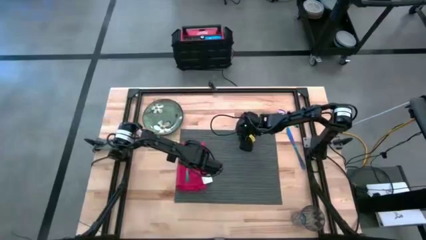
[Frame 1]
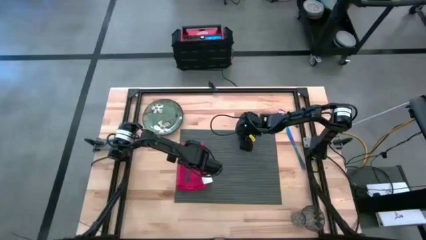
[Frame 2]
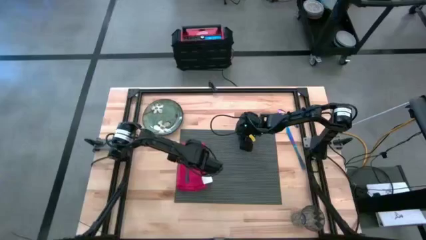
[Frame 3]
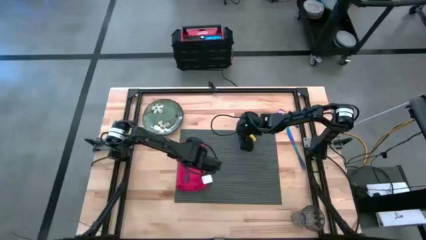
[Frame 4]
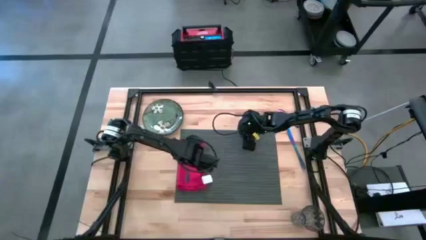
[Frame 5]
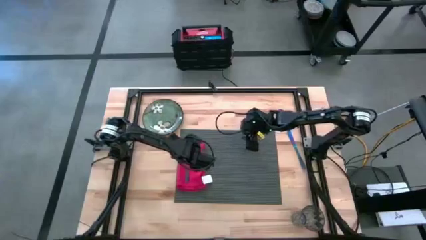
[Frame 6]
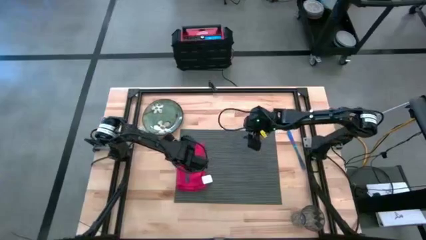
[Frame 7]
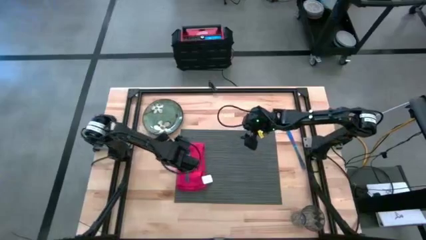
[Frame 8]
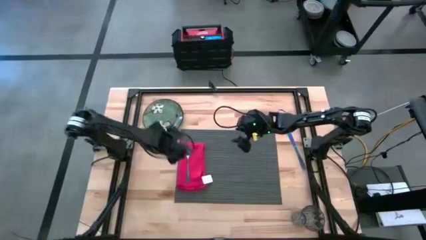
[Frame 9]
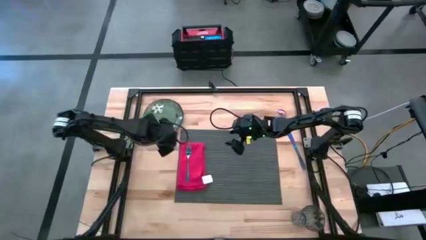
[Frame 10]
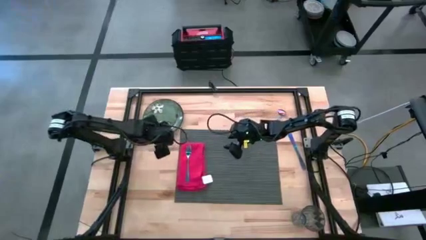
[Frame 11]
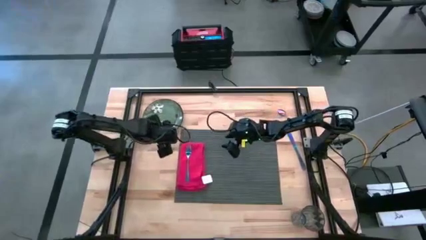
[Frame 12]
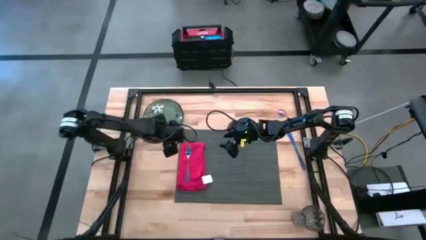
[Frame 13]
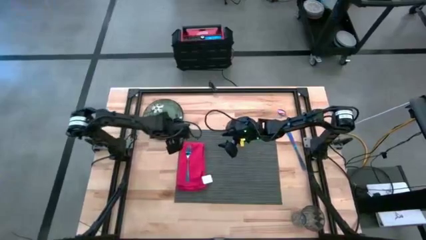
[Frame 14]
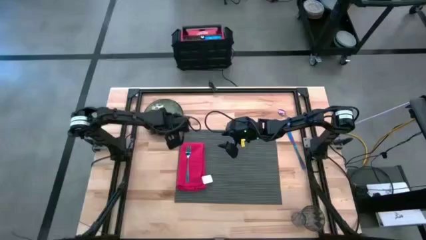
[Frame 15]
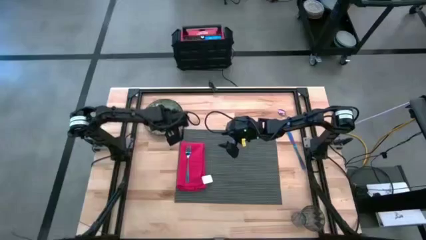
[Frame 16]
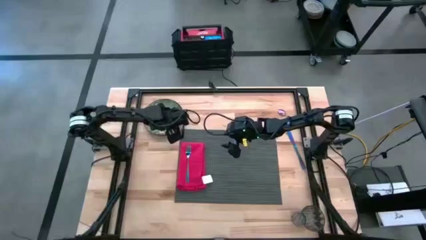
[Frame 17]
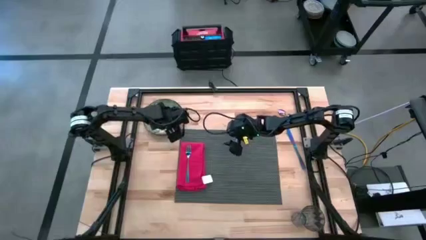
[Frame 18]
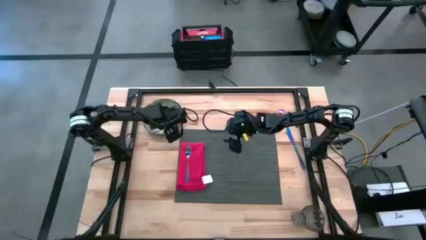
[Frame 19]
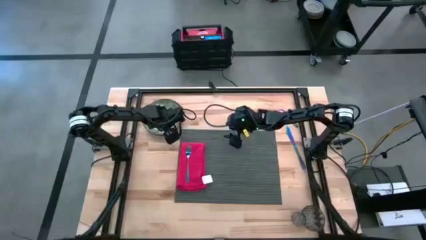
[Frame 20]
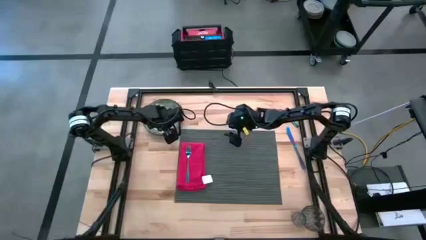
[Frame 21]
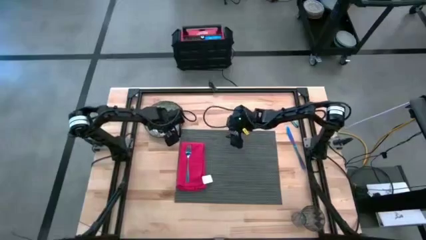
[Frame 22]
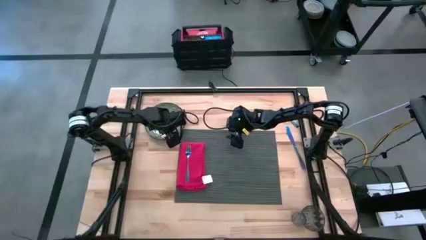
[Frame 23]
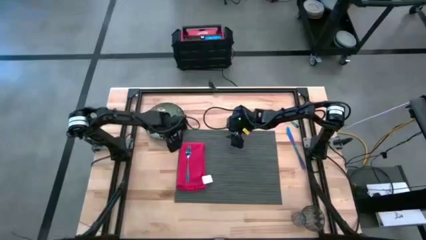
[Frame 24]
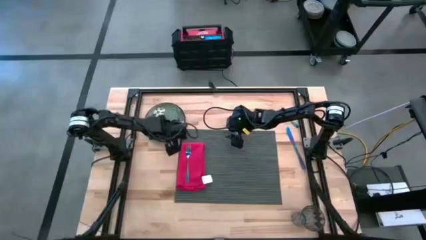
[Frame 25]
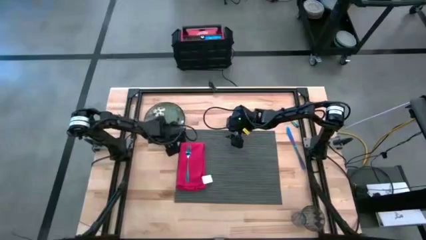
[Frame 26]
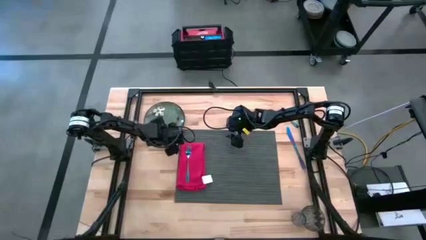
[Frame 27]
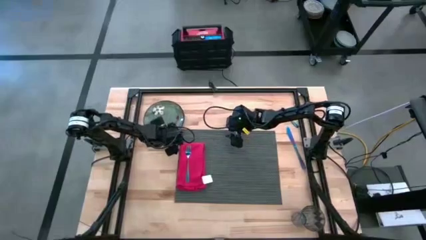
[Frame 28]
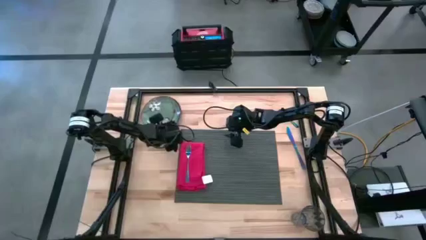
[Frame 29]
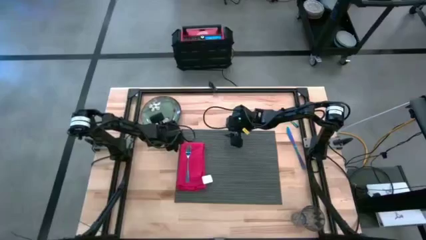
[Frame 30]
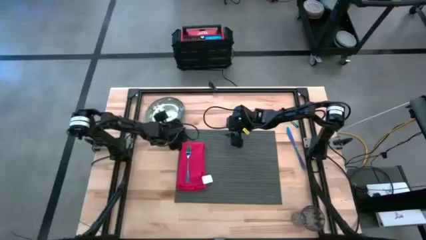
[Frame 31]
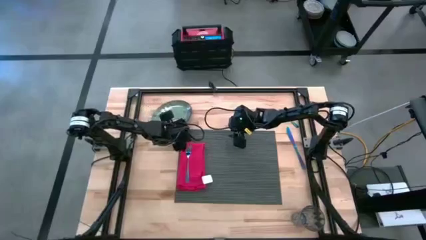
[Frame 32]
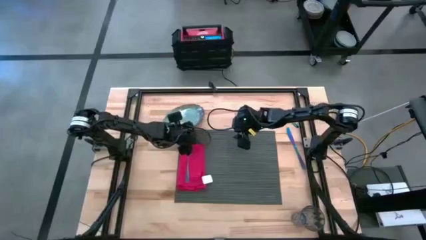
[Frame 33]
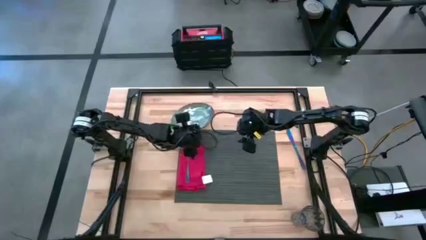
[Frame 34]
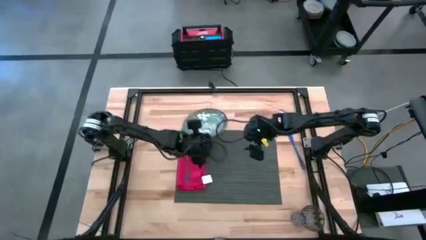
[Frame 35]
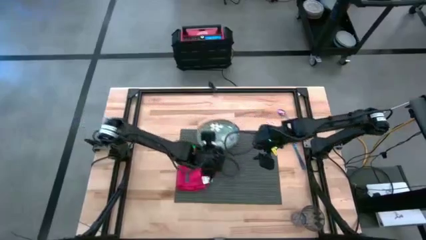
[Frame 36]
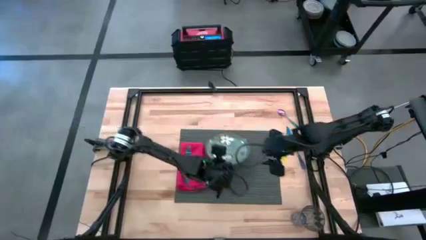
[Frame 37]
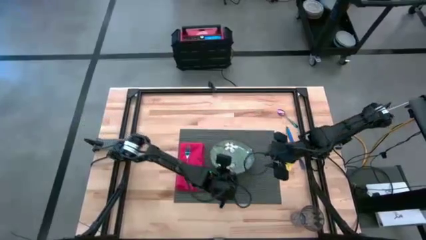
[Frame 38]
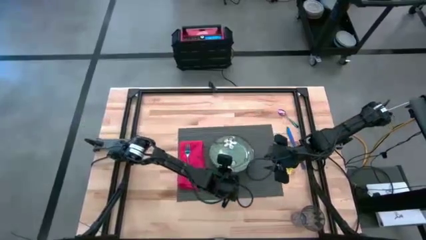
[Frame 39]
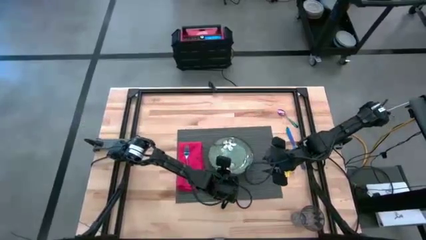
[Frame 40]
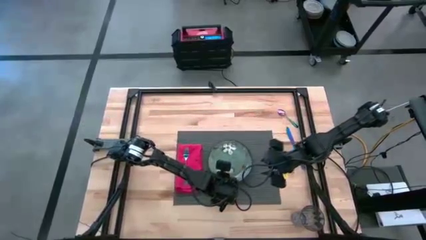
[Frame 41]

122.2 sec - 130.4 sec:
Task: Set table place
Put the green plate in the center of the gray table mat

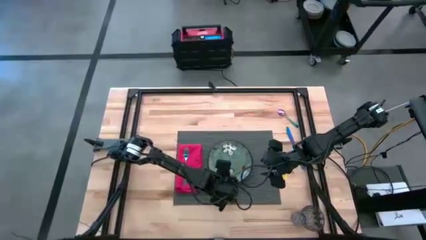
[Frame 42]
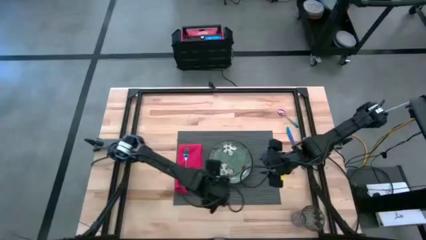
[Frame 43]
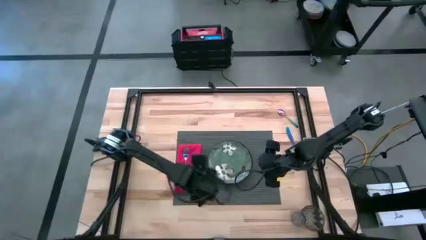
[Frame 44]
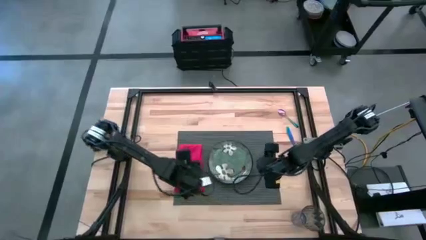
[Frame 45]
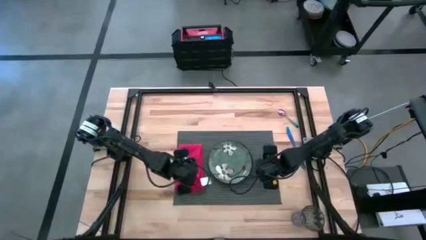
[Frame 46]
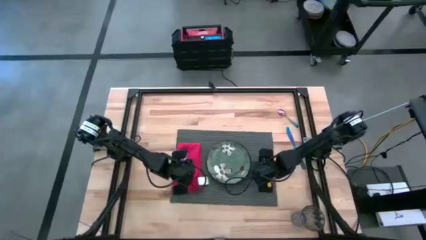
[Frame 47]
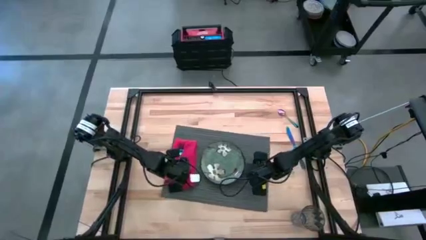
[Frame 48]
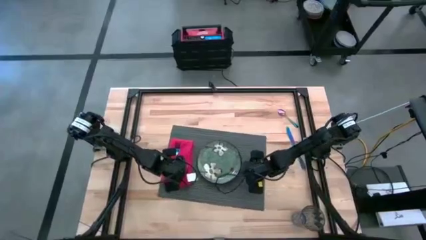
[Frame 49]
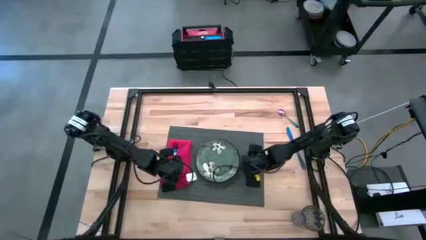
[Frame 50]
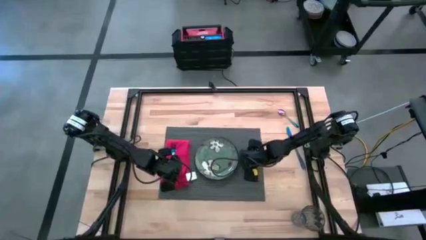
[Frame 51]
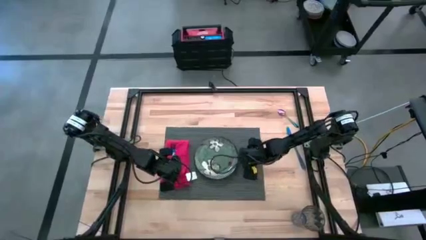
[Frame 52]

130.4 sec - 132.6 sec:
Adjust the gray table mat on the table

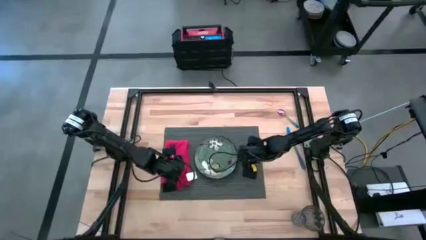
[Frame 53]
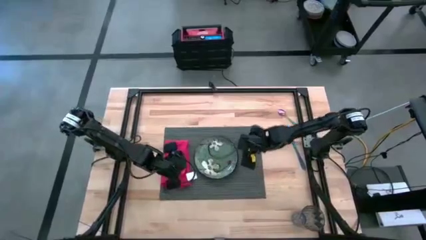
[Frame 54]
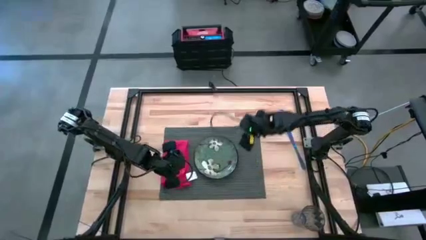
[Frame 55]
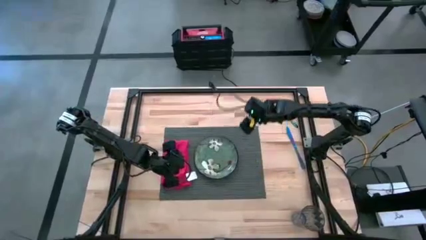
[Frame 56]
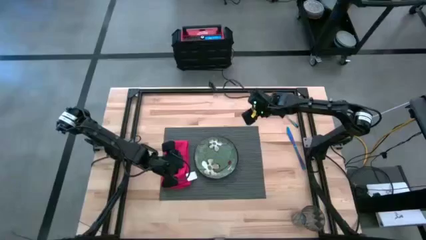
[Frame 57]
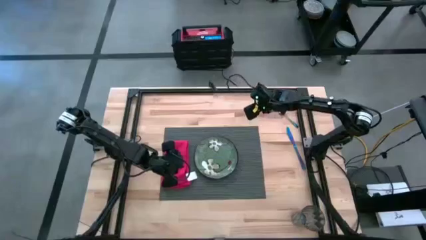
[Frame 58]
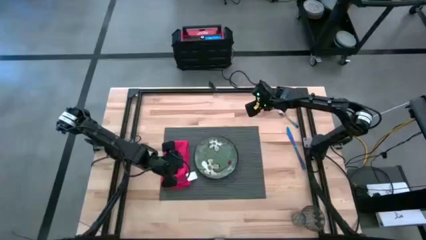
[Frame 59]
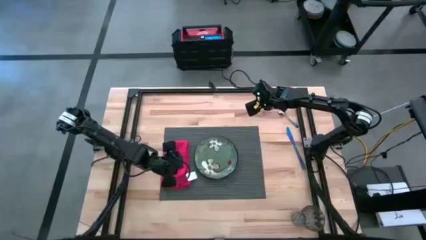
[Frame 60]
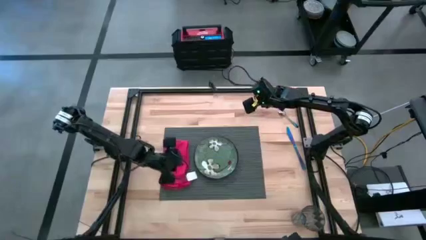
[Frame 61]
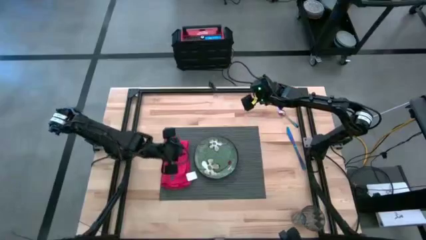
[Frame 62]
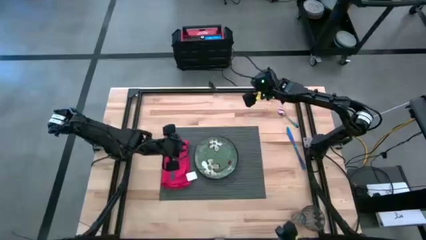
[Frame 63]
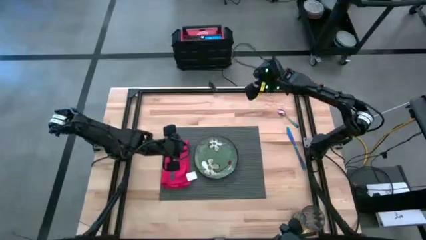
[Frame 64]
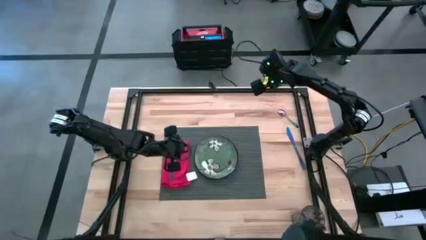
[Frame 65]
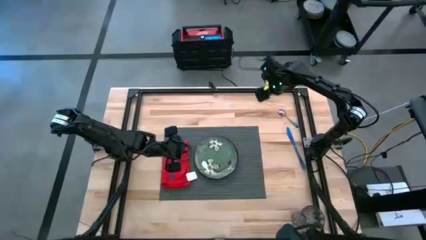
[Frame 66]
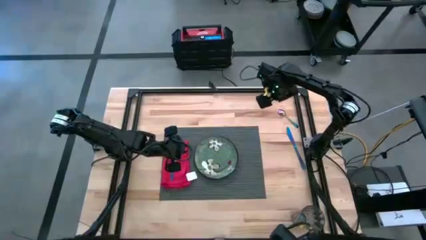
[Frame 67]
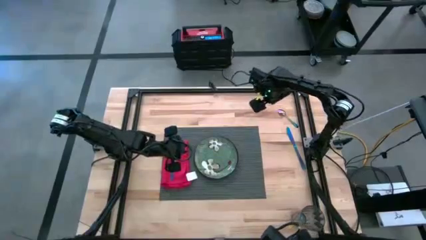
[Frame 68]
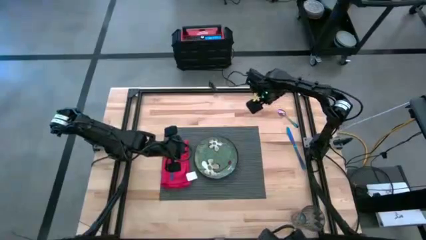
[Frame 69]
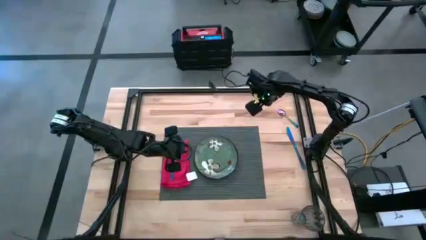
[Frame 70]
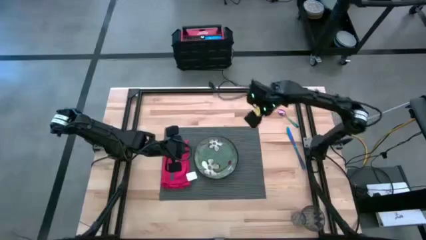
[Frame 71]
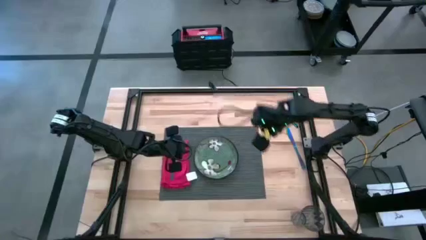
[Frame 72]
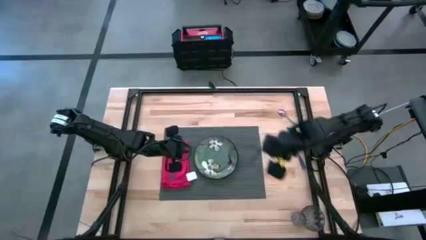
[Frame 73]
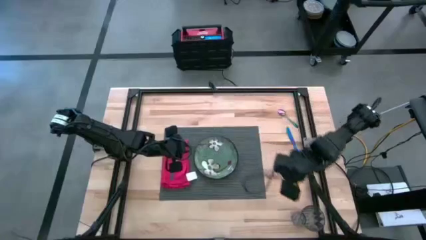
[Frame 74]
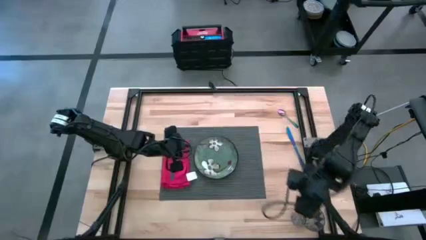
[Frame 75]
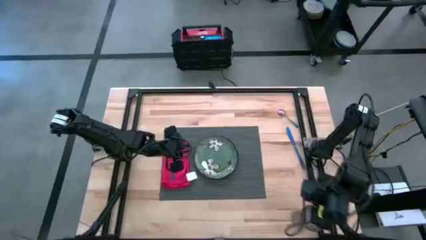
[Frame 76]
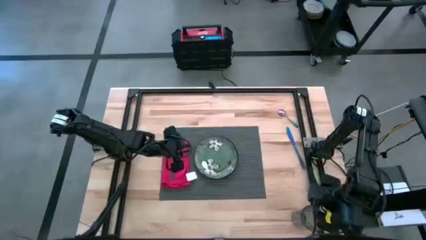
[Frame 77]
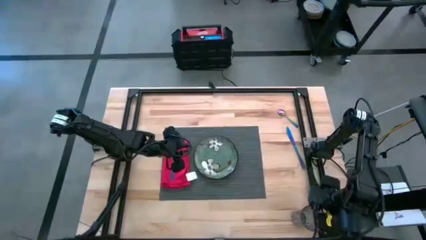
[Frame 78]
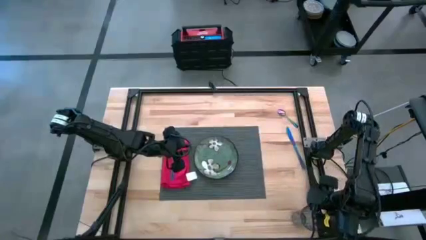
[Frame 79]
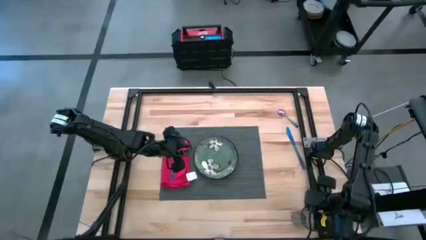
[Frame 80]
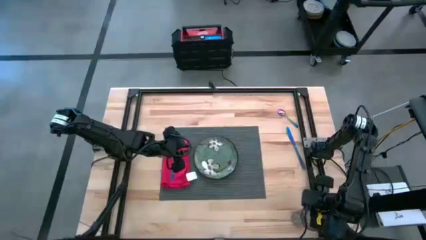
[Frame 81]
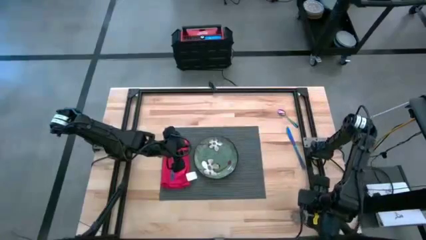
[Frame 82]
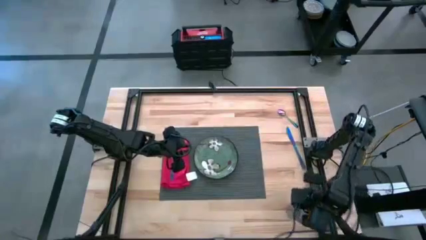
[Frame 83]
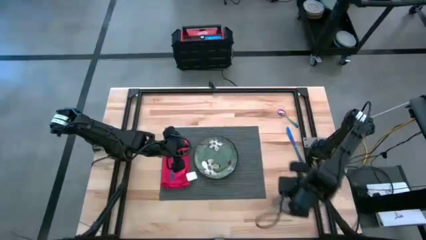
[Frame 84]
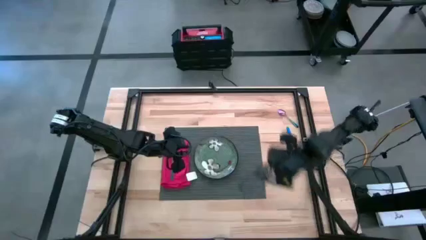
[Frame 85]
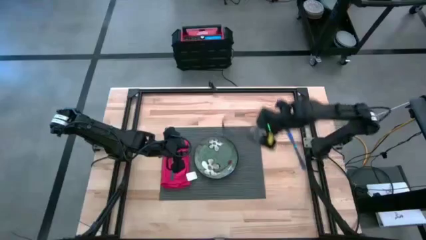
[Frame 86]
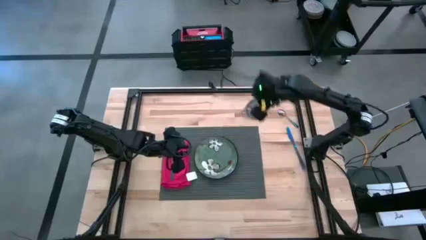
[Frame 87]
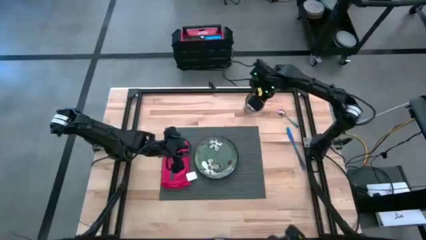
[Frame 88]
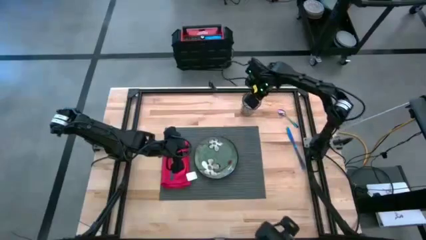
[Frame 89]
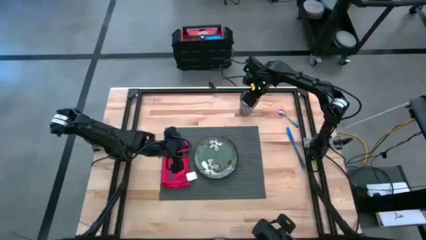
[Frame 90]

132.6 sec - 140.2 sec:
Move the blue glass to the top right of the gray table mat
